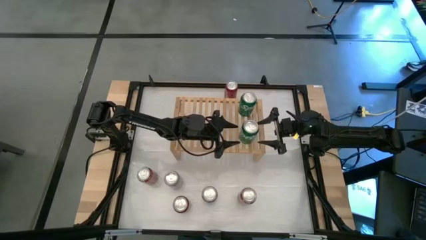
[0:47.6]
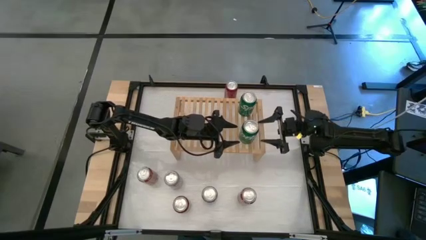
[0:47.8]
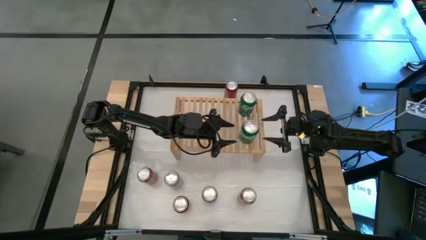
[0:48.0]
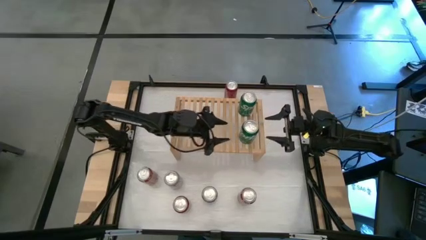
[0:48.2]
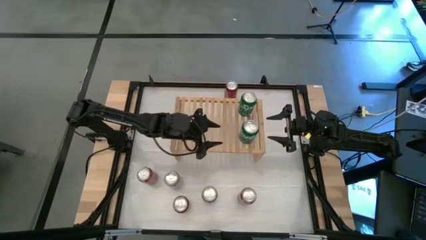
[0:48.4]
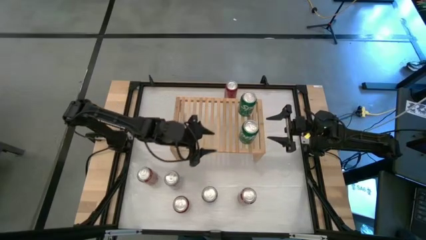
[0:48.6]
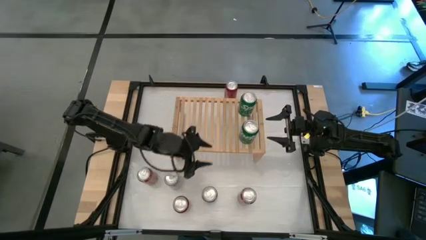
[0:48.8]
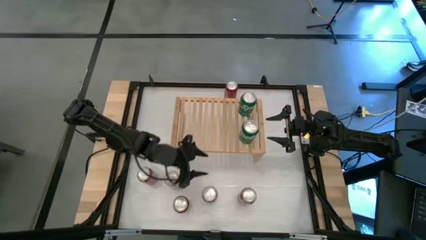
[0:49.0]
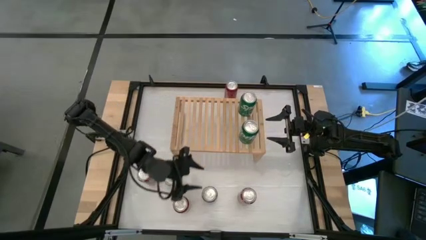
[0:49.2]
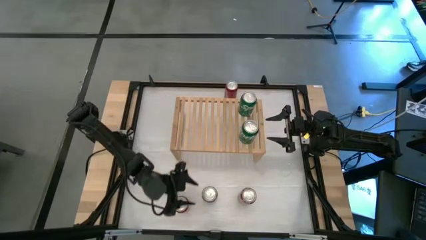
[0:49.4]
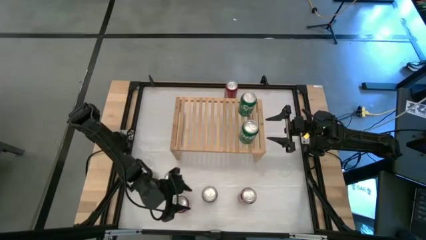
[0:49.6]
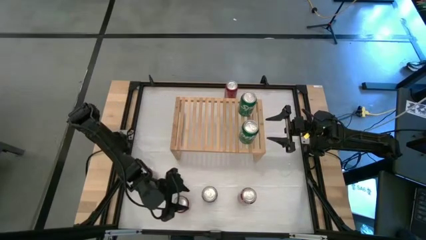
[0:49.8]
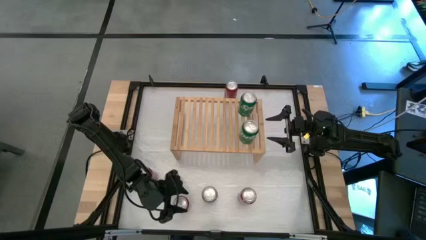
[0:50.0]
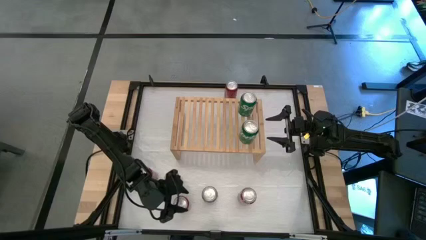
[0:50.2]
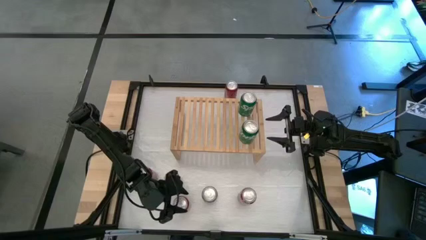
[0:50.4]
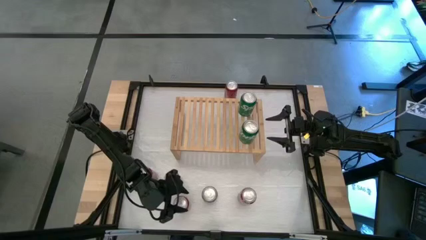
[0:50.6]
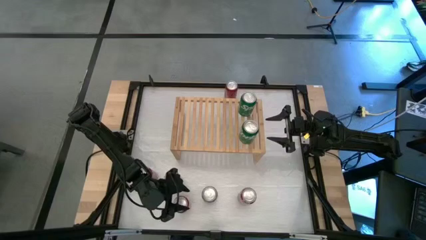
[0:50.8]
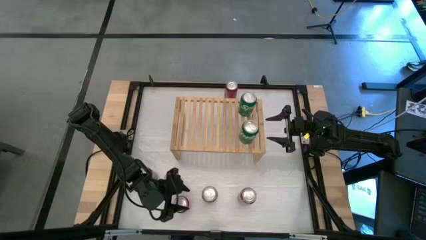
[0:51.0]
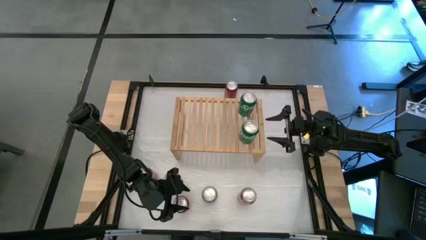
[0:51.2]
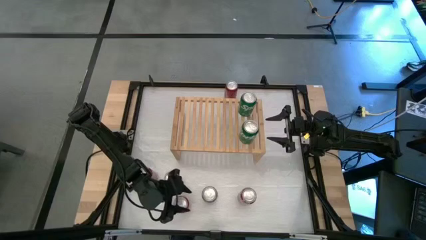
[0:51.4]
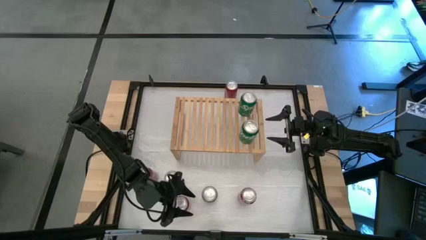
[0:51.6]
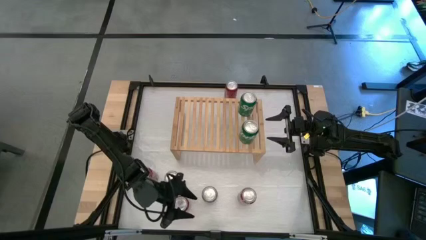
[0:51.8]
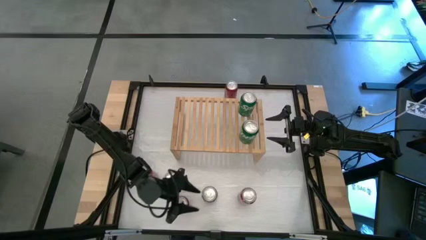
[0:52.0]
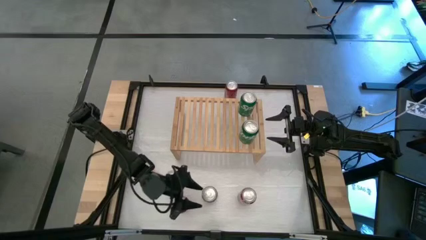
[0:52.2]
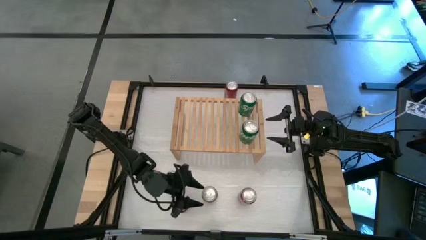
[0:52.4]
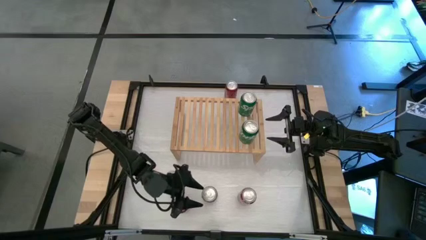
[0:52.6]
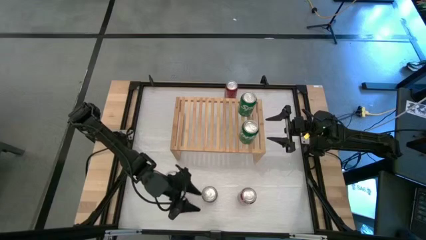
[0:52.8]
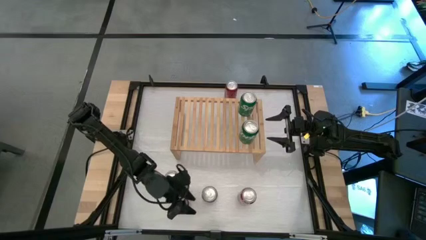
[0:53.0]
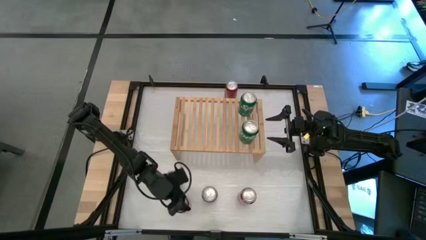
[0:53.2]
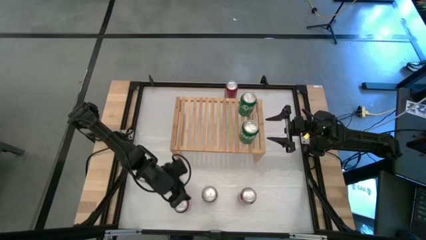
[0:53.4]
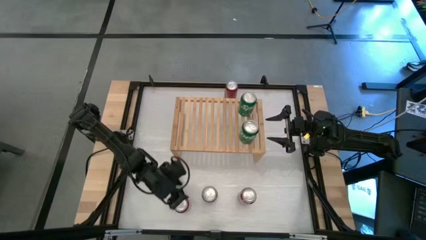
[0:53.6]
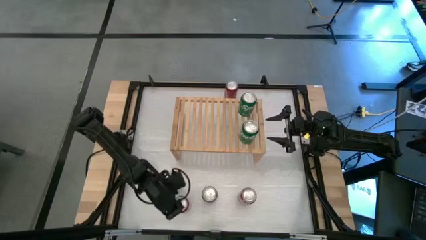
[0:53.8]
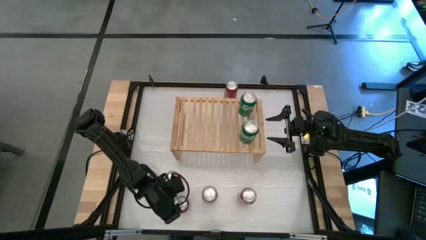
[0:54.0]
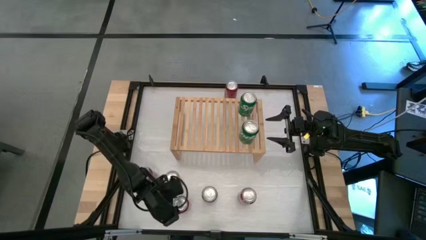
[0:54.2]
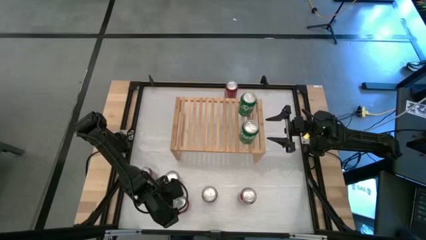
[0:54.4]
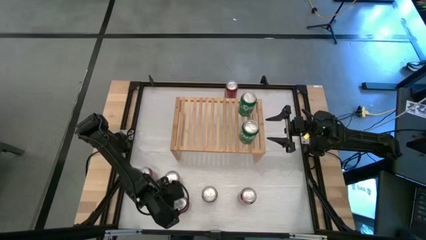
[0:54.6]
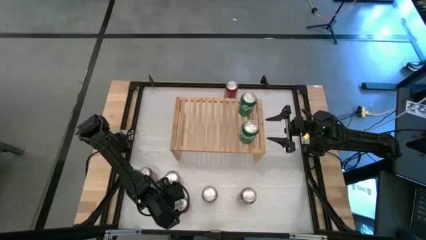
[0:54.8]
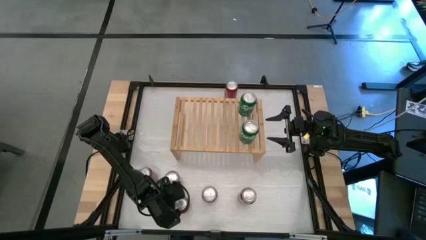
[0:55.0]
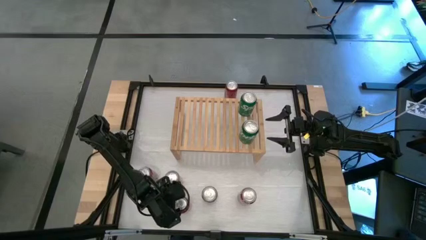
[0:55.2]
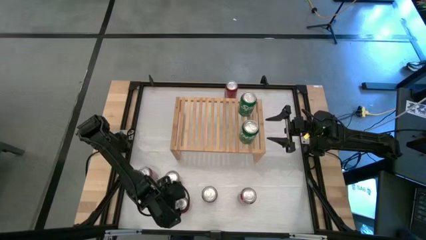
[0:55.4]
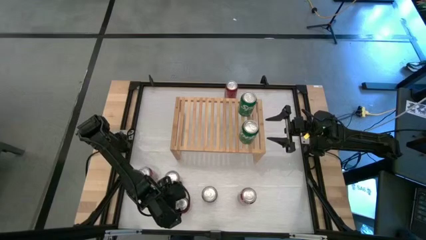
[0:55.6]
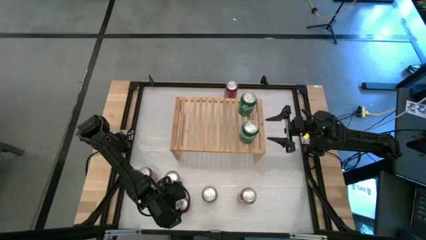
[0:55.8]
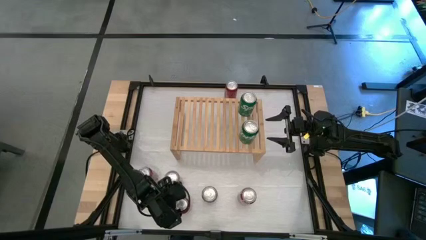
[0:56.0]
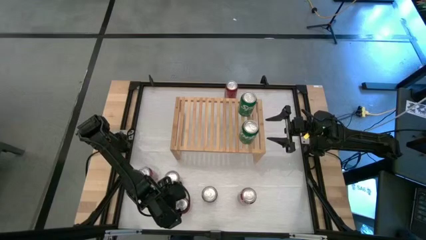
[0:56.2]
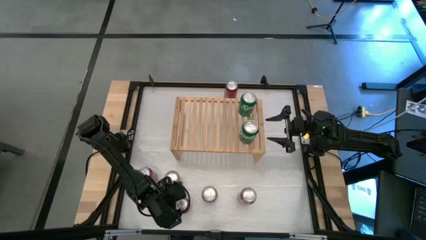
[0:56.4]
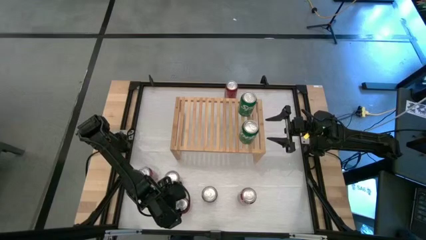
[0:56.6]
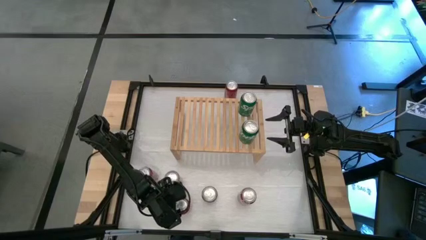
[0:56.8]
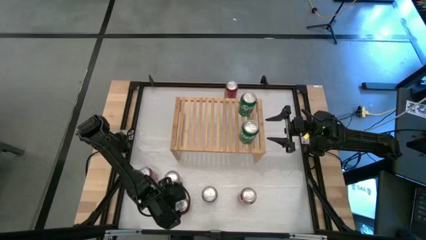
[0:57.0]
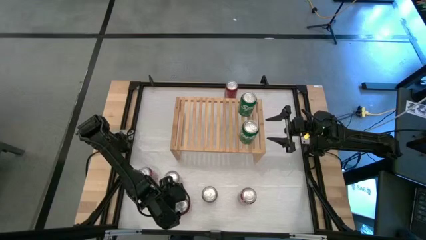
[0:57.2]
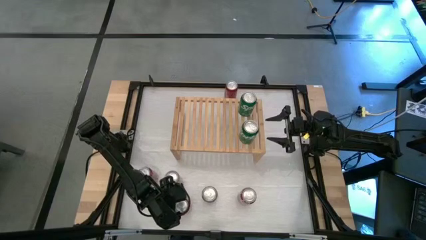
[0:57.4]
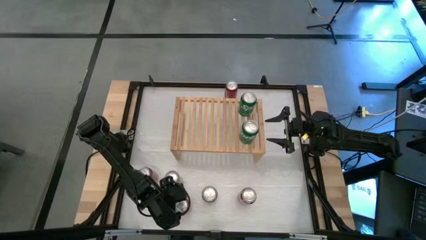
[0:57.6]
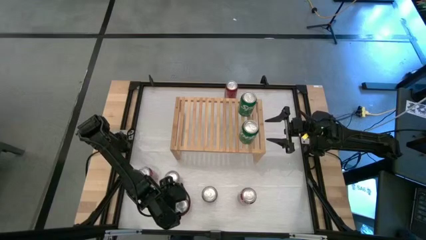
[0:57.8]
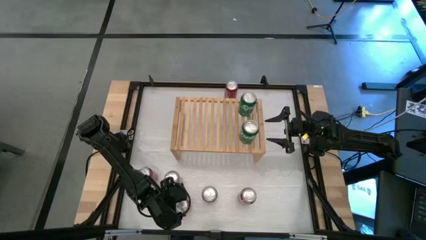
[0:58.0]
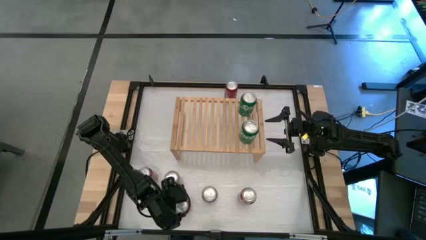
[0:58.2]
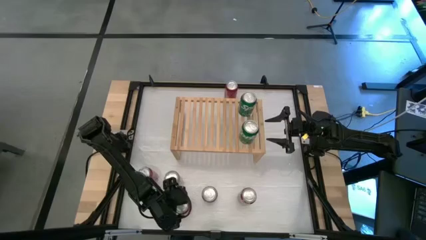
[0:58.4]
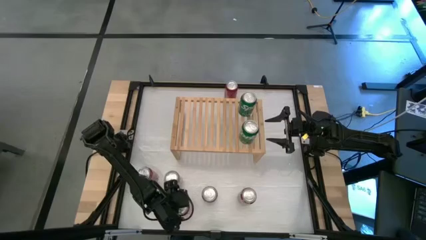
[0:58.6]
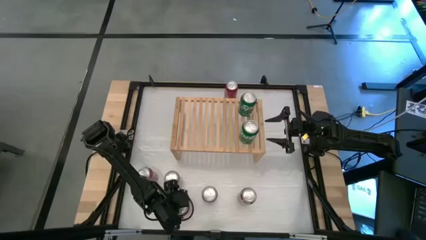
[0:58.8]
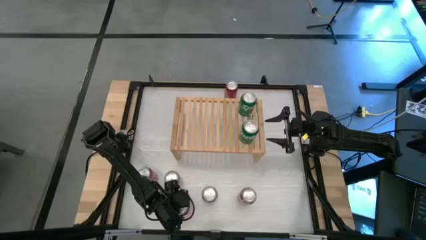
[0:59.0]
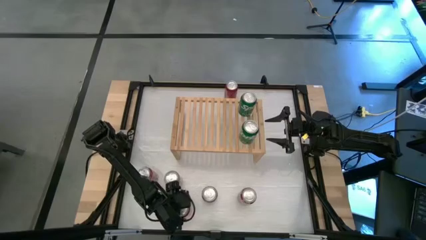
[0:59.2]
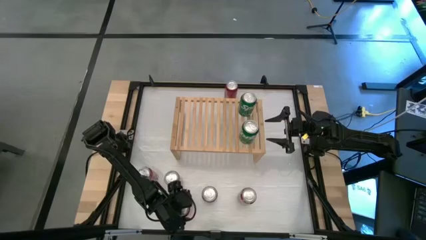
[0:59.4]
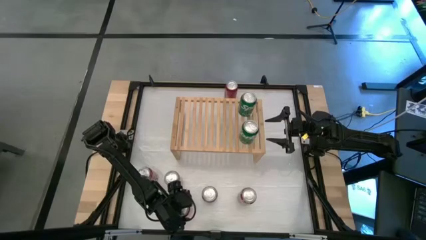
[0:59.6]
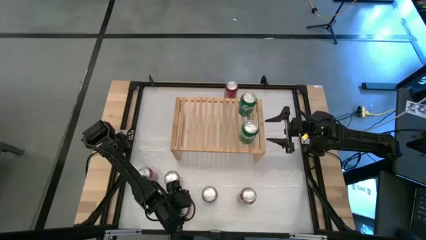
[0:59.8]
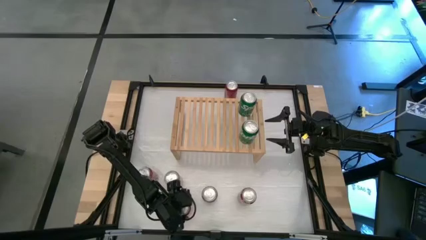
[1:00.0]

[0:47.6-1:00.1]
Task: Place canned beverage on shelf
Put the bottom red black soda can on the shelf
